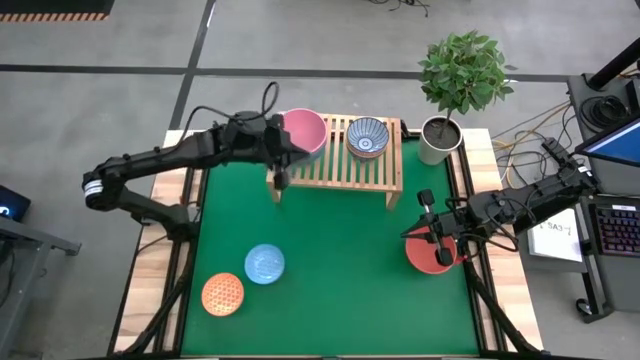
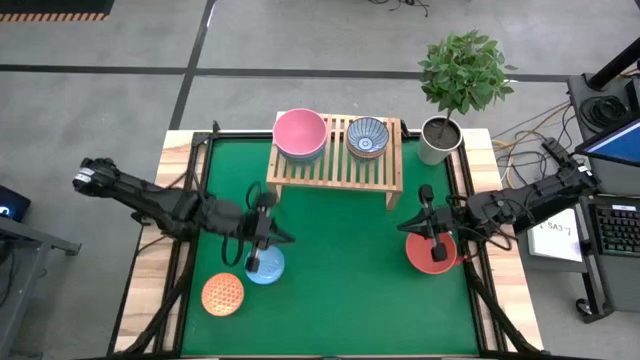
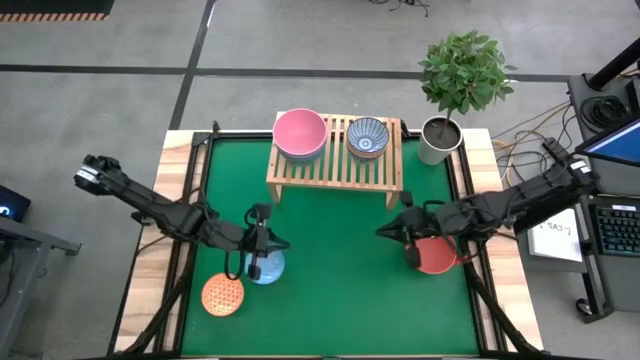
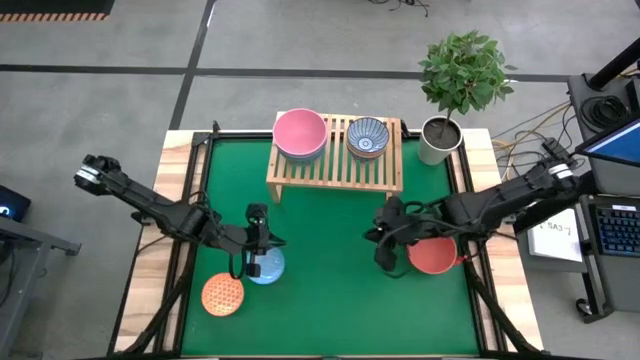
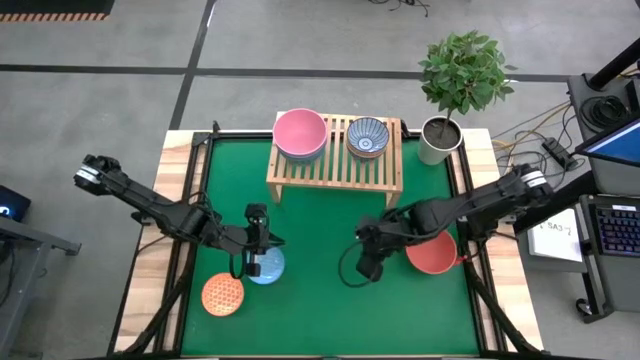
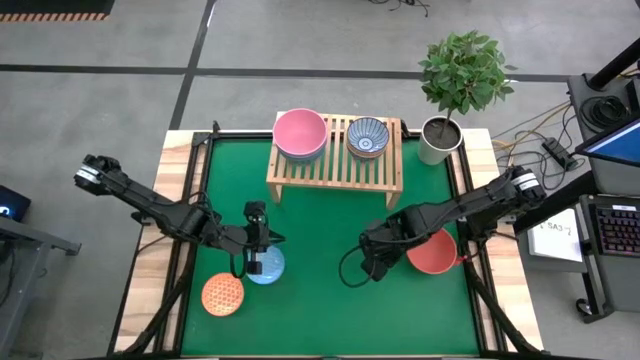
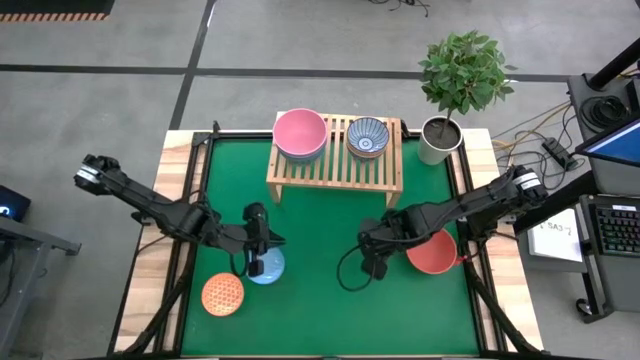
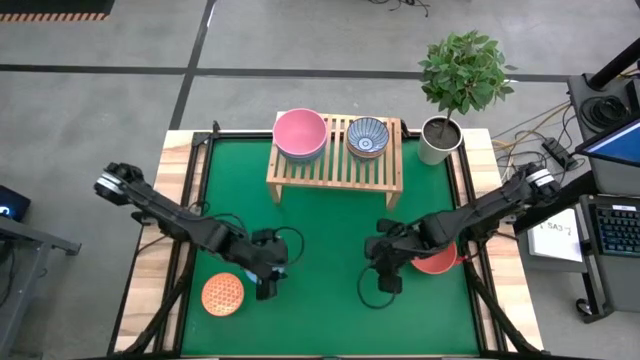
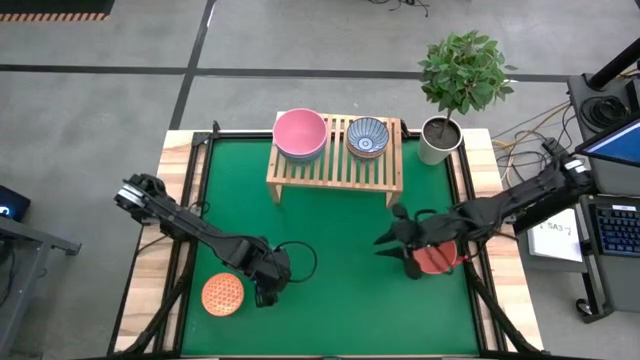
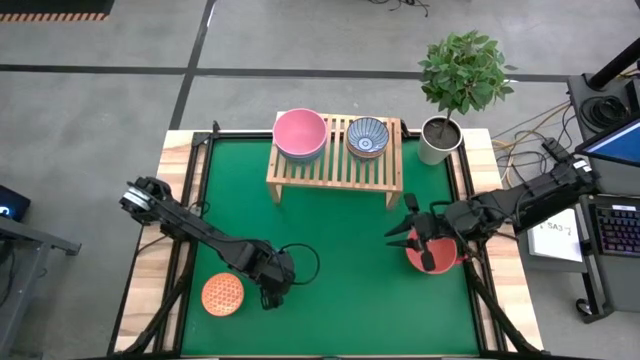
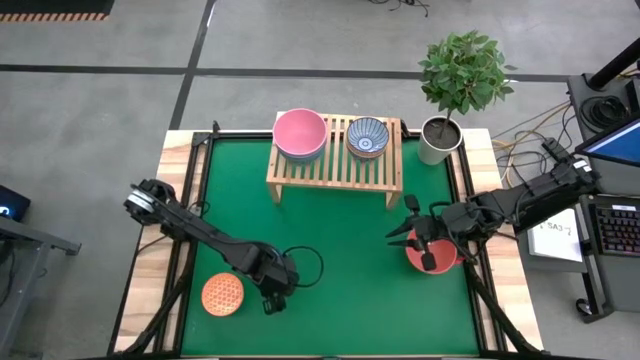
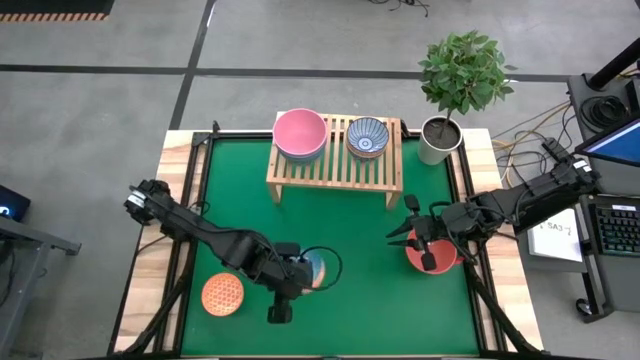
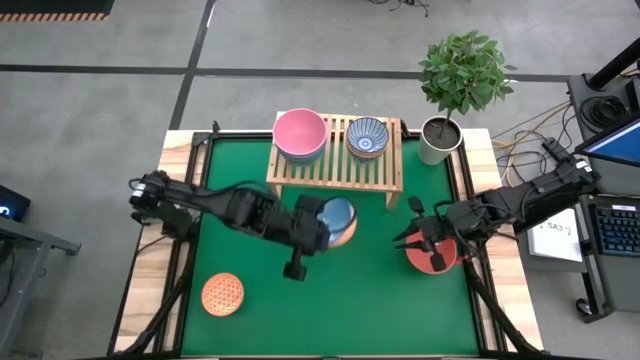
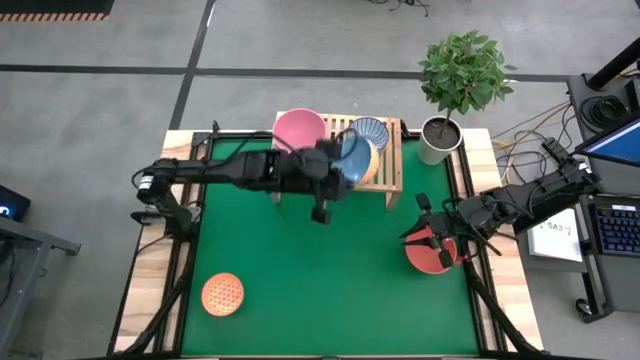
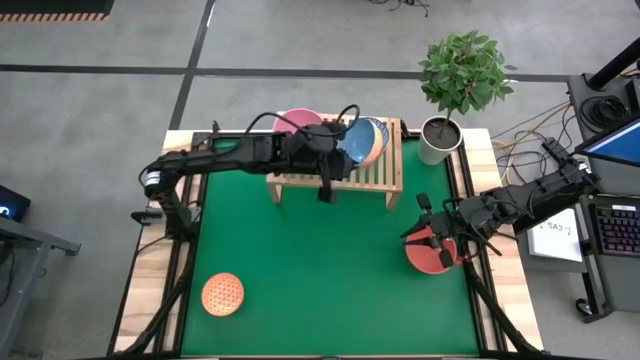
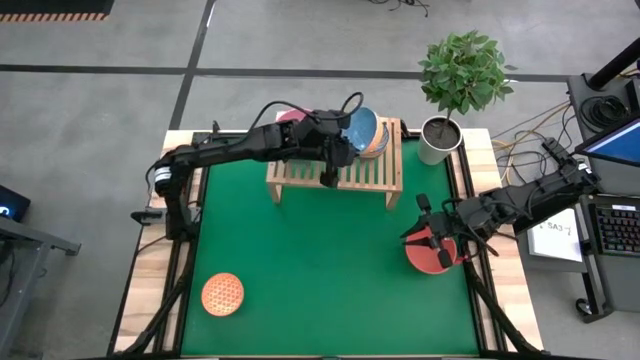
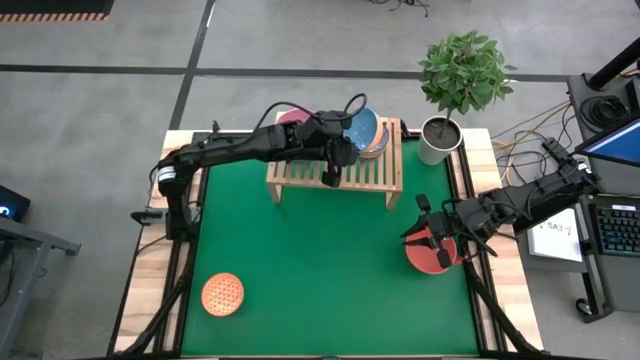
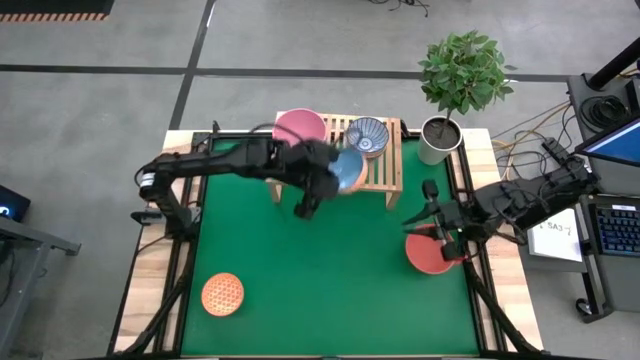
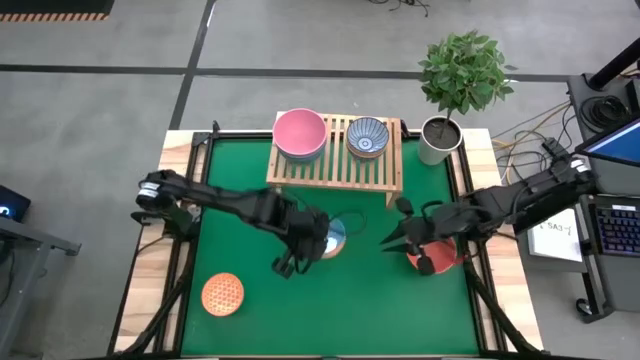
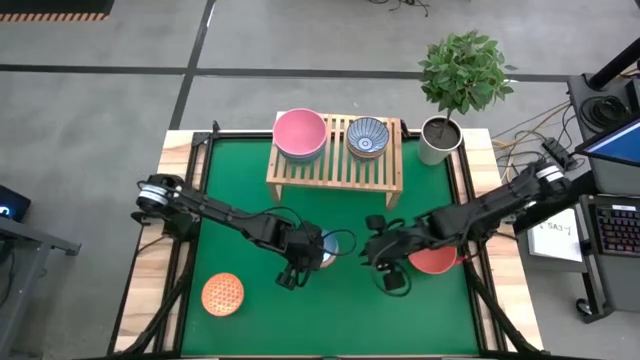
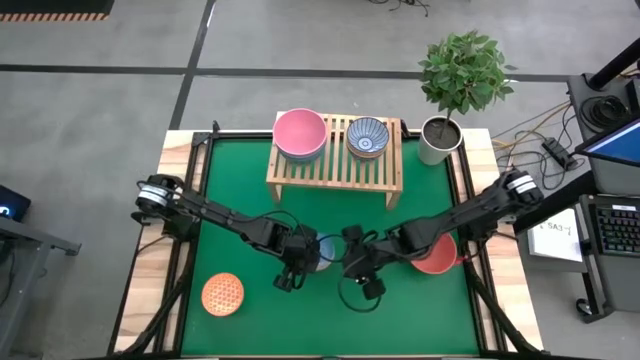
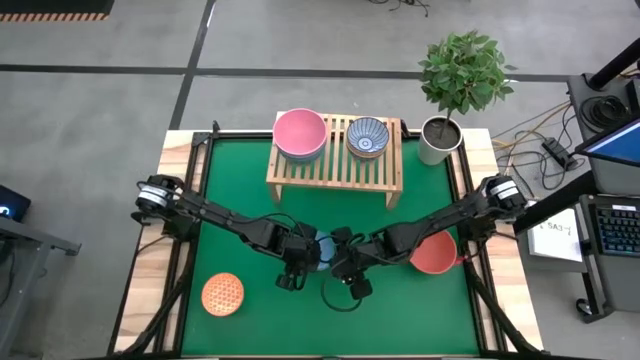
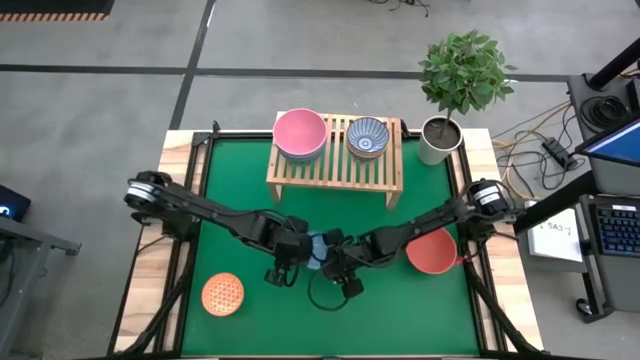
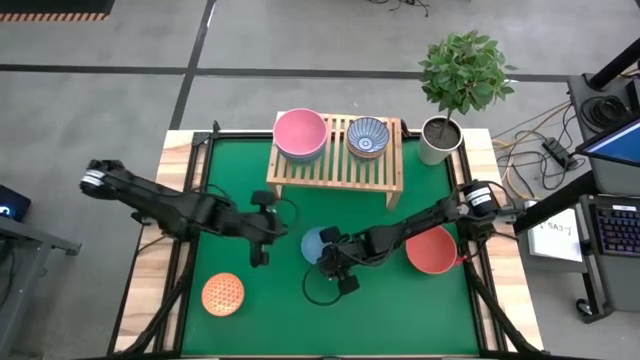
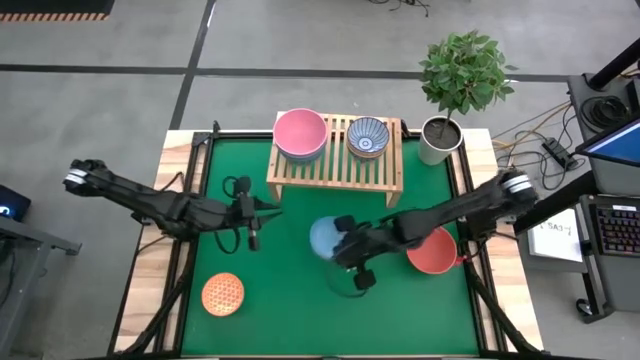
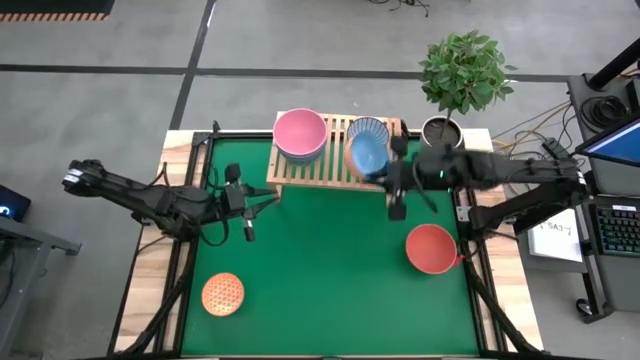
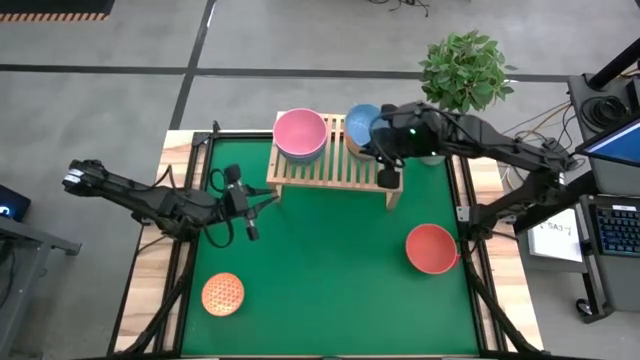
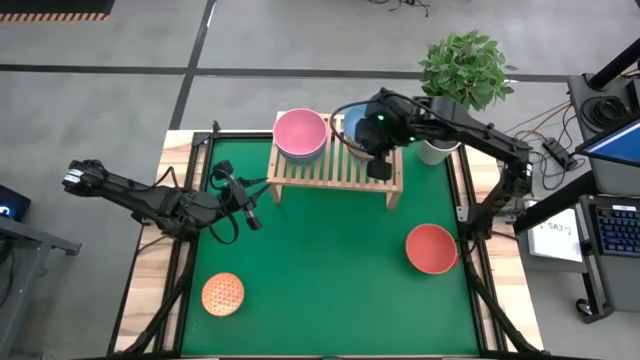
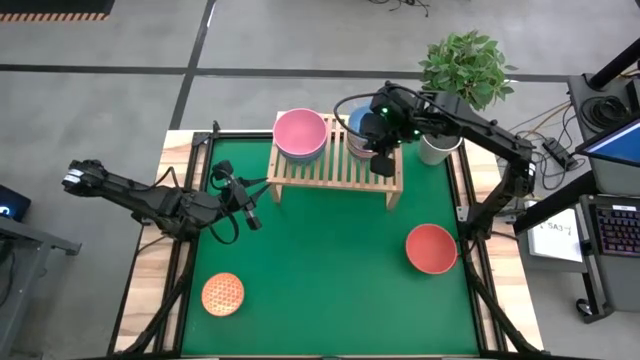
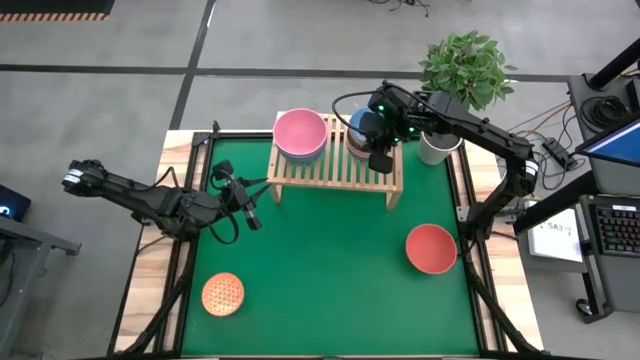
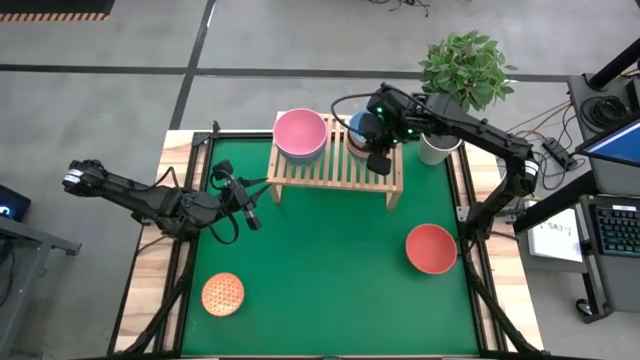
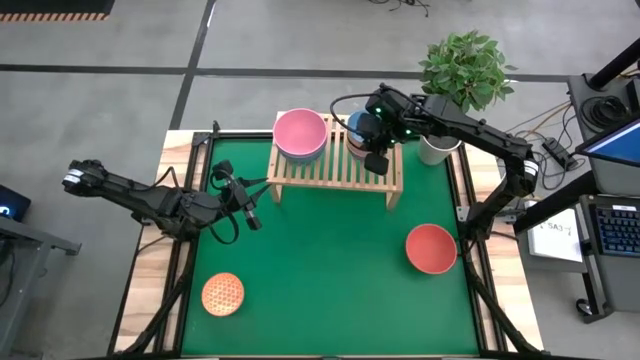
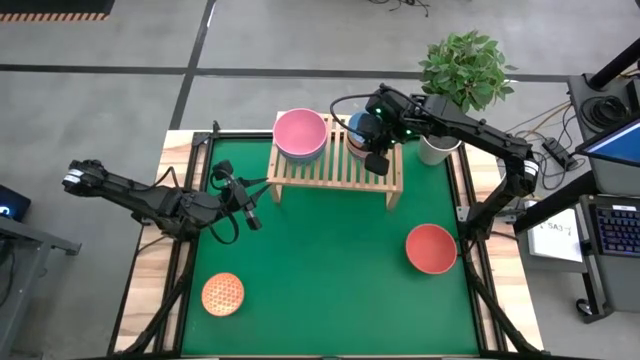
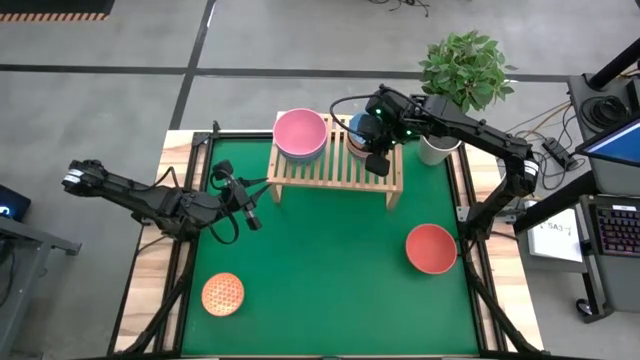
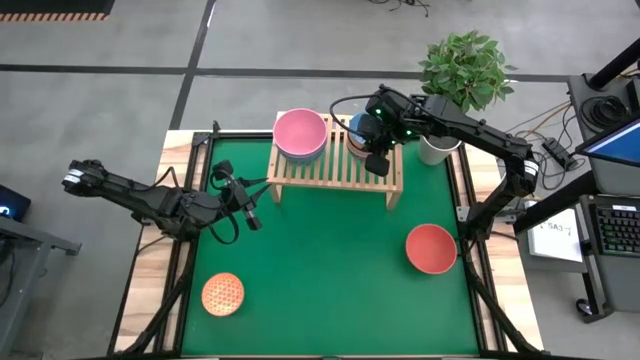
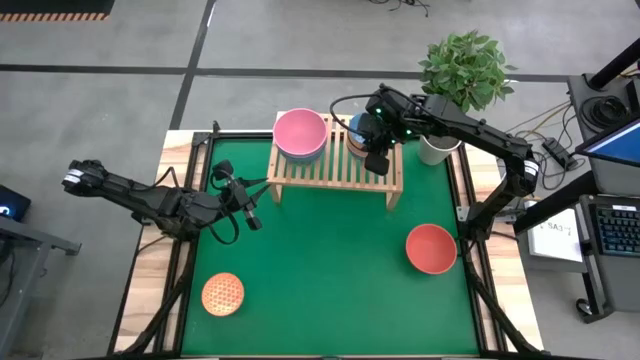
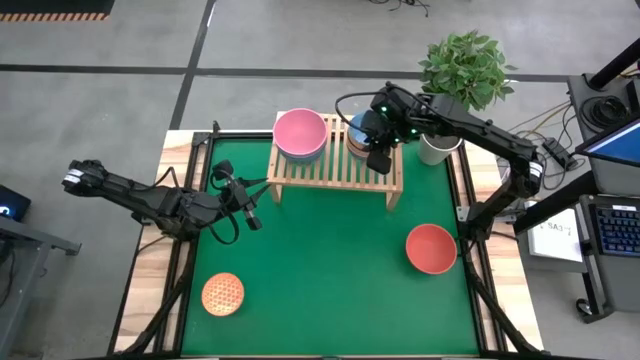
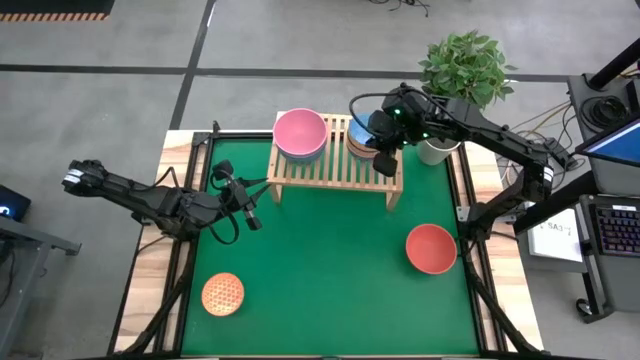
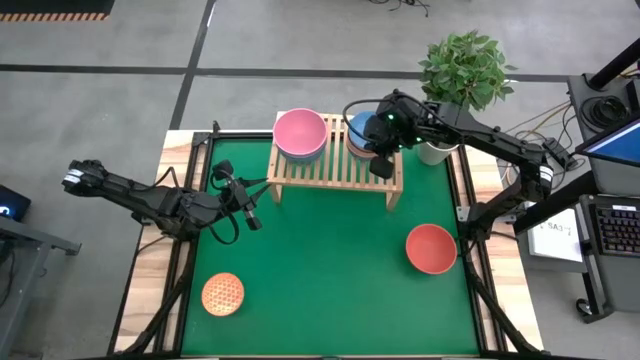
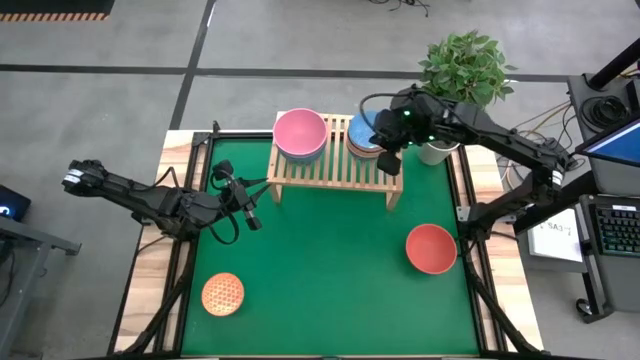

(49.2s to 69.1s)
Task: Place and stack bowls onto a shelf
Stack the light blue patterned bowl on top of the blue patterned bowl on the shelf
